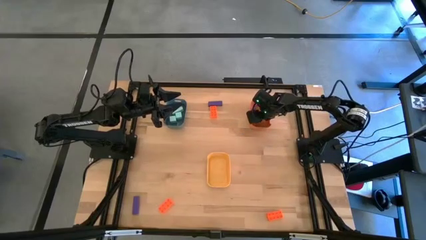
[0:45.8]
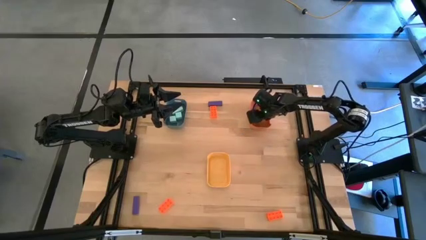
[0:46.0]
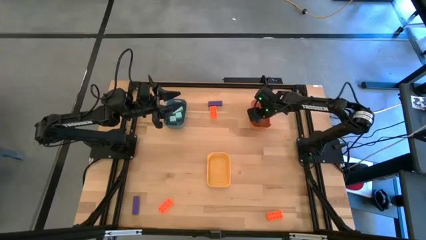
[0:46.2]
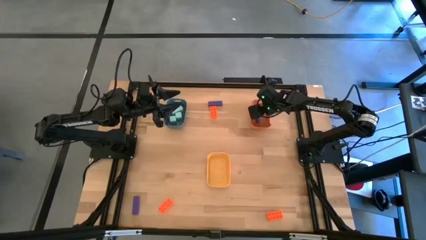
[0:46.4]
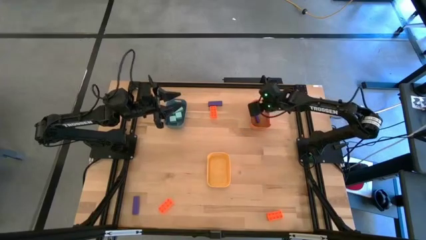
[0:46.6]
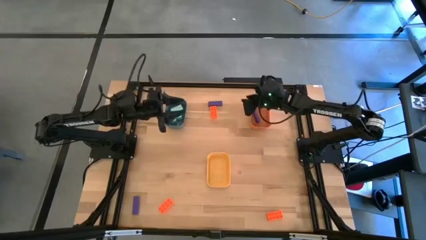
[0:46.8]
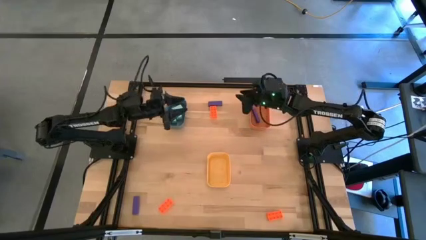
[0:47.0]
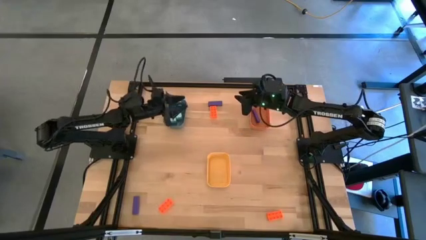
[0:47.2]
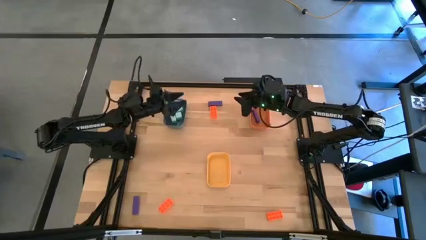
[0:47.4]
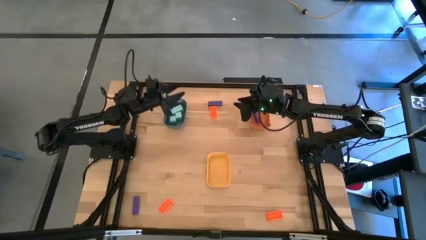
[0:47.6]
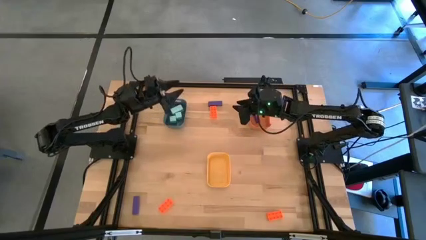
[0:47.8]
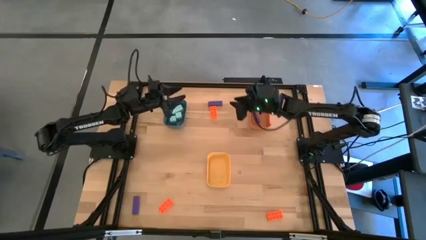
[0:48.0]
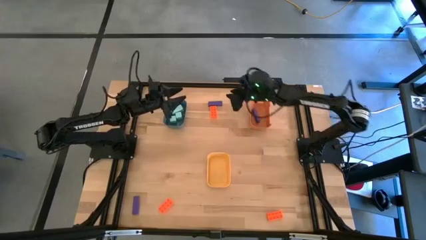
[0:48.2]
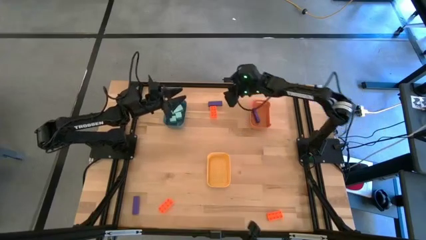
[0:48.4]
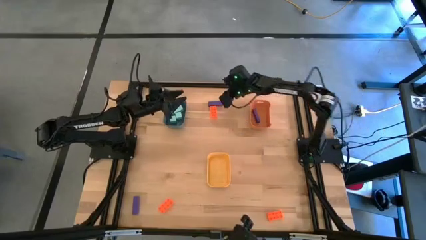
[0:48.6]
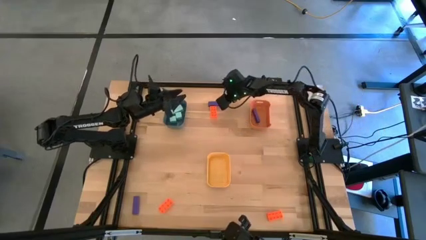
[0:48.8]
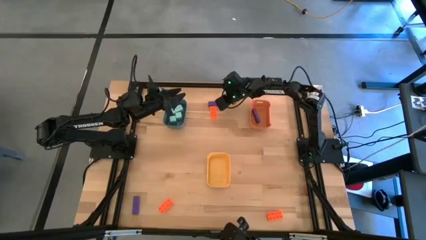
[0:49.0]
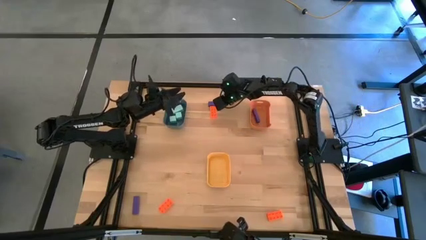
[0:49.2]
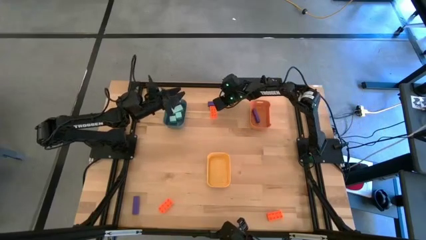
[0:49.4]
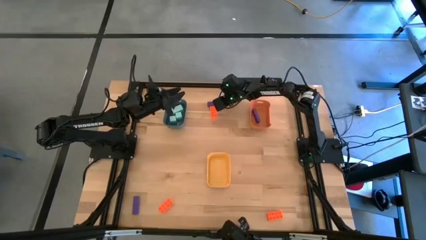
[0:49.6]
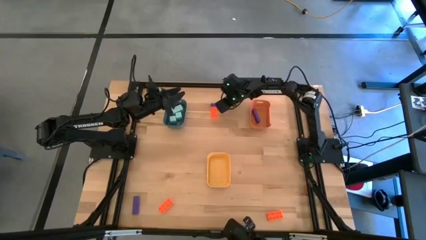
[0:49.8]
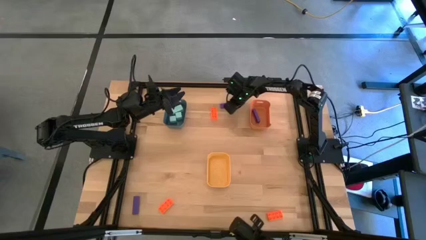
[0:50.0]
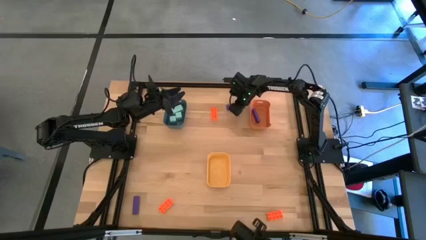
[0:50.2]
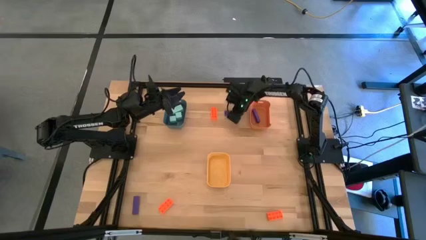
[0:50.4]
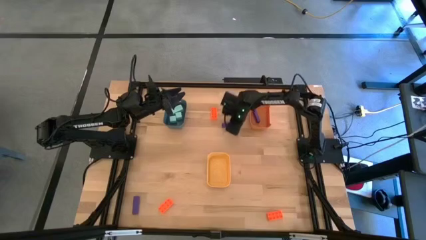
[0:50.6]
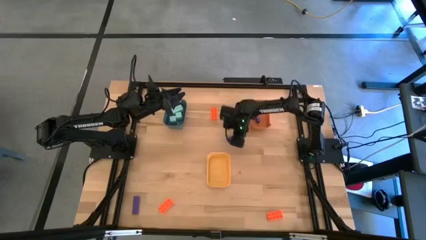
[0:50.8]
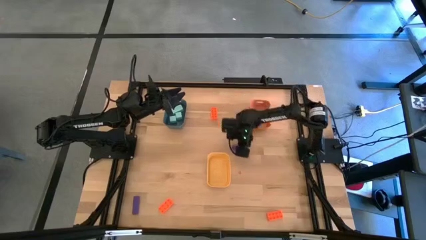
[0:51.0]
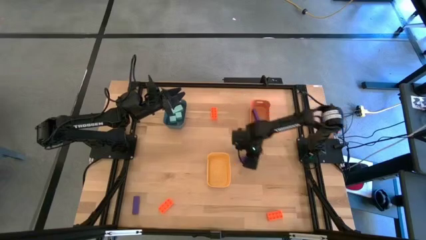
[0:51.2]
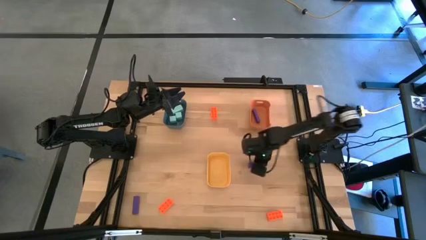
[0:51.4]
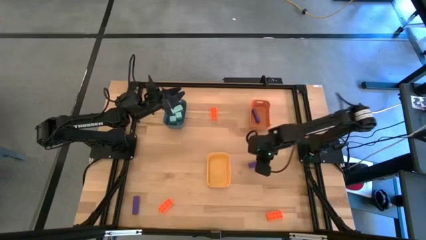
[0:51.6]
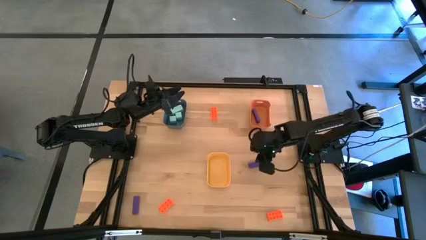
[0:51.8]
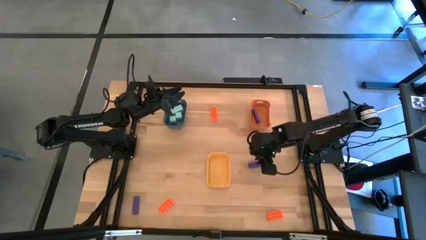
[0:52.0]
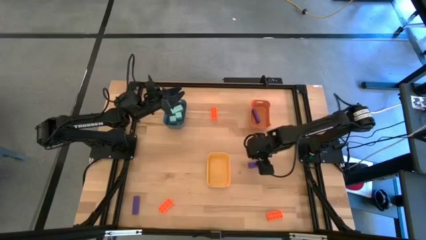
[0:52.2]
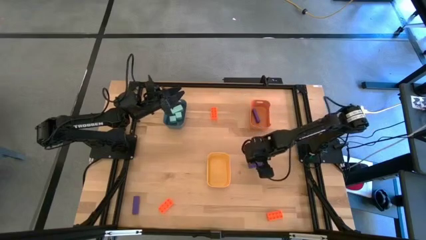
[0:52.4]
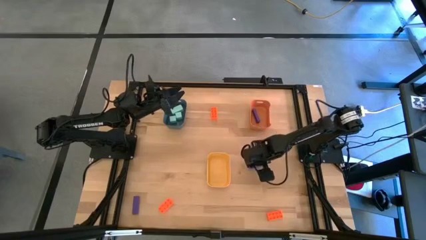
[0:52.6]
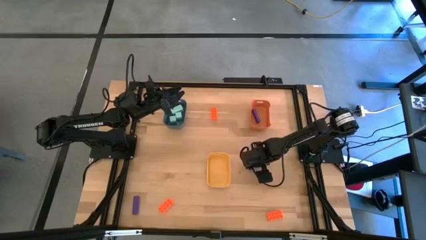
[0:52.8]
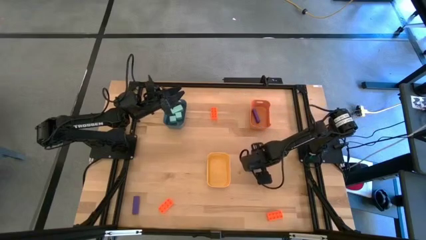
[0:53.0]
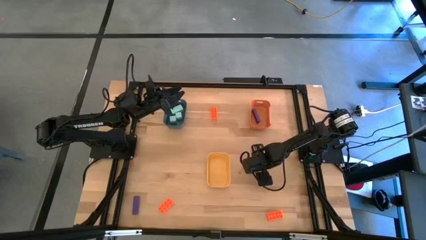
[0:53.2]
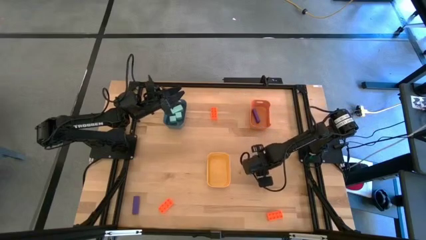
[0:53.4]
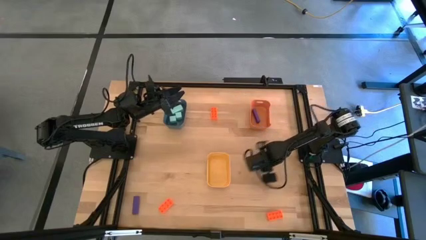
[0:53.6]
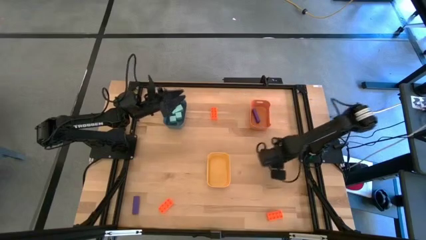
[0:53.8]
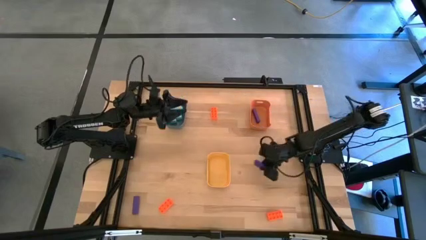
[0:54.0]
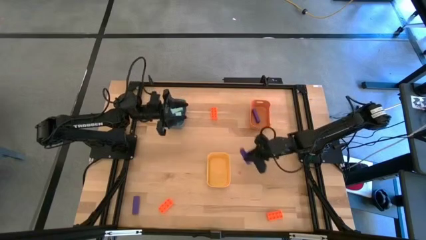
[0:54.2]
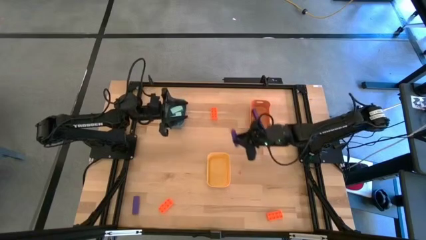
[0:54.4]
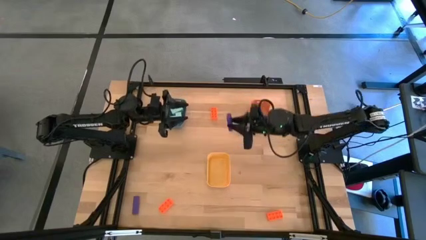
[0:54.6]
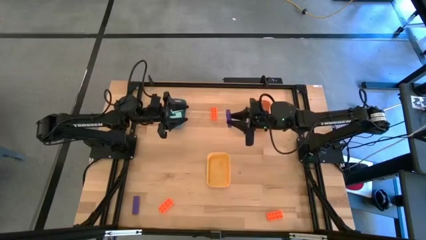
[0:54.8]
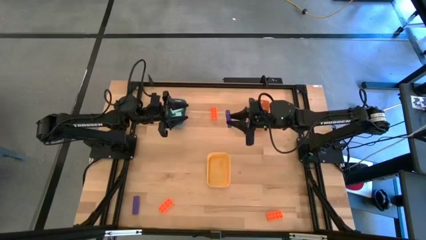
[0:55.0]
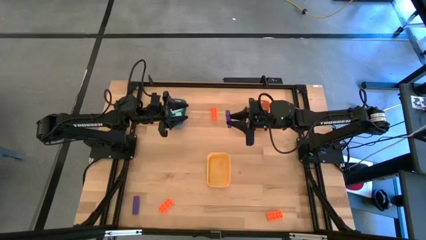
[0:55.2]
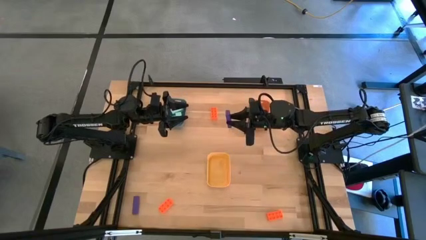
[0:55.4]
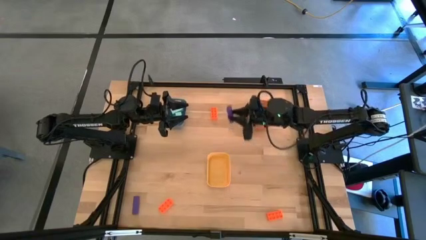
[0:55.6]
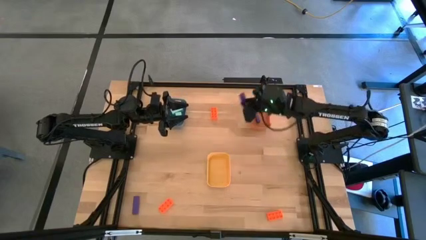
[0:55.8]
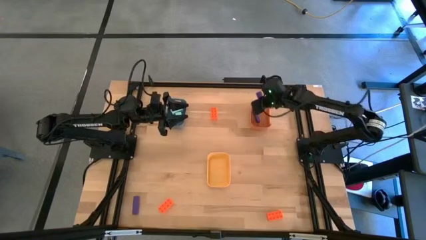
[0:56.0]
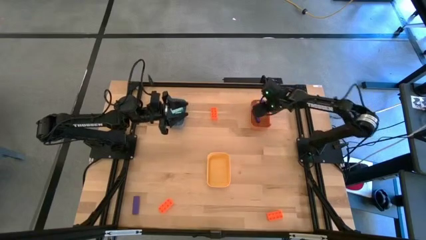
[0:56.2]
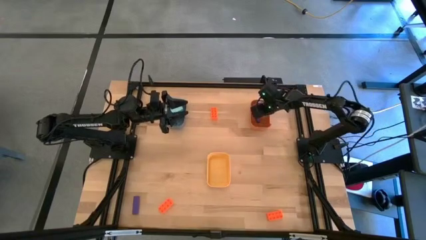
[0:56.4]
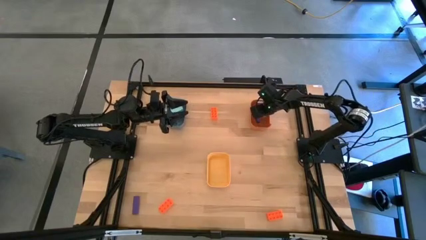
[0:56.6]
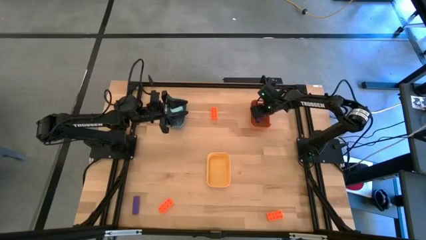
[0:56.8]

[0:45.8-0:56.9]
Task: Sort & place blocks by color
Put the top purple block into the orange bin
